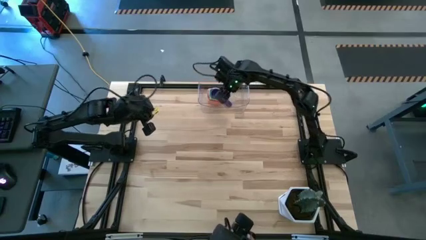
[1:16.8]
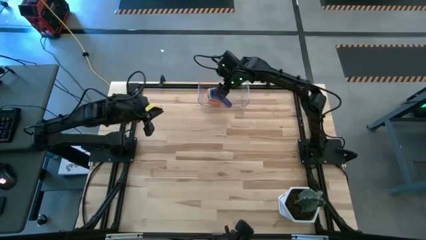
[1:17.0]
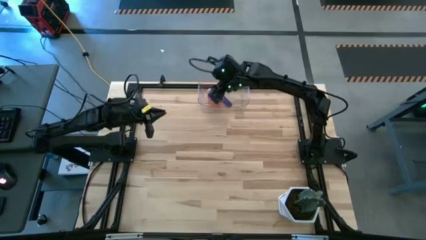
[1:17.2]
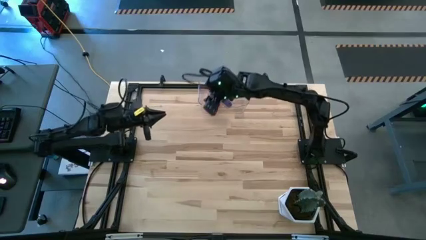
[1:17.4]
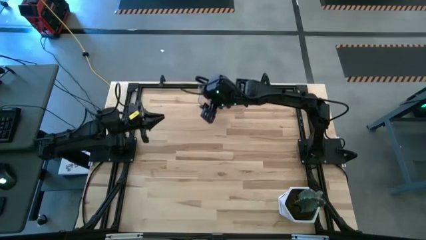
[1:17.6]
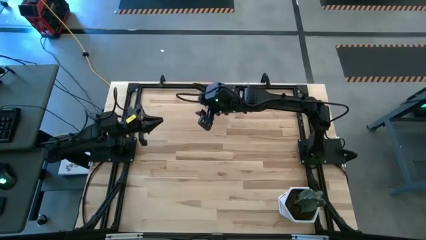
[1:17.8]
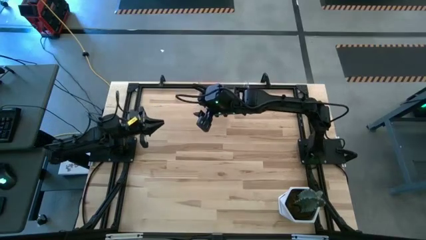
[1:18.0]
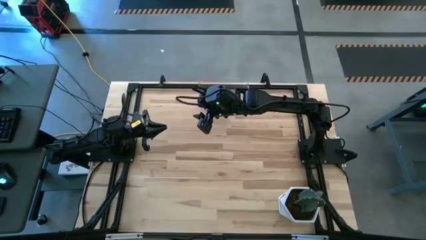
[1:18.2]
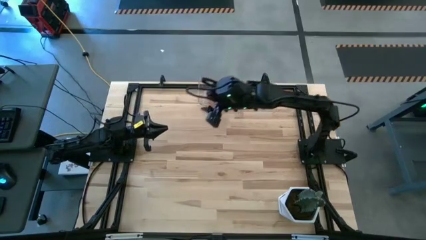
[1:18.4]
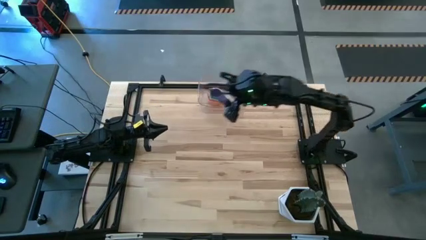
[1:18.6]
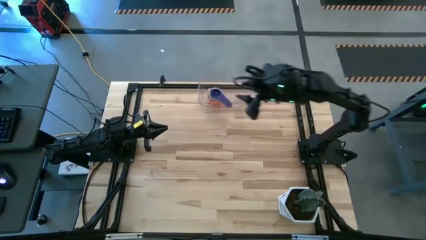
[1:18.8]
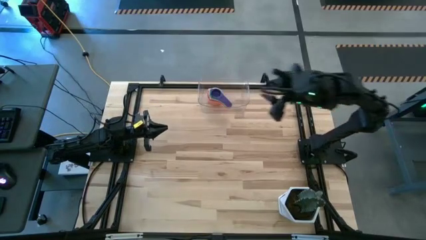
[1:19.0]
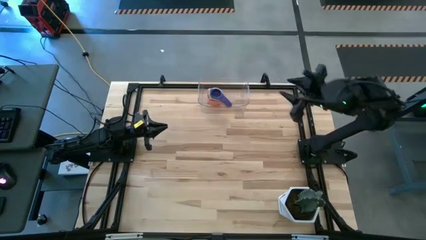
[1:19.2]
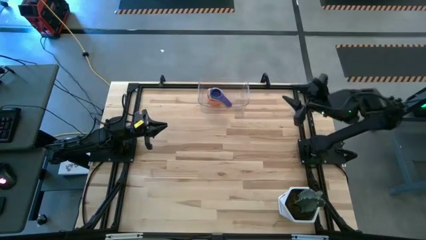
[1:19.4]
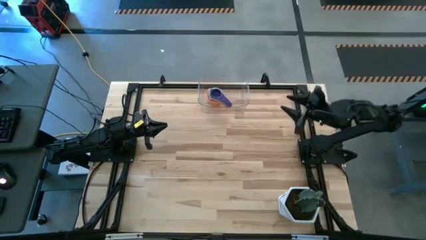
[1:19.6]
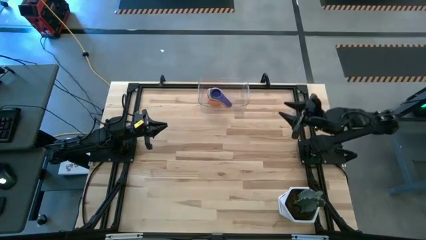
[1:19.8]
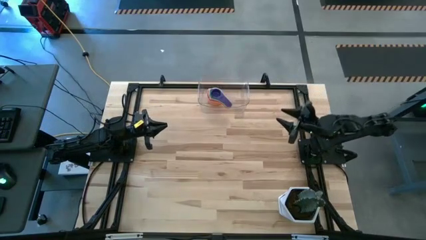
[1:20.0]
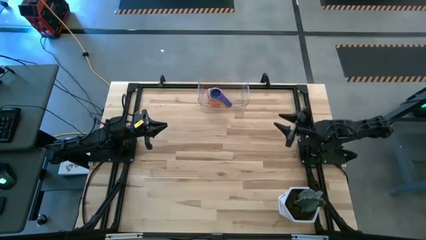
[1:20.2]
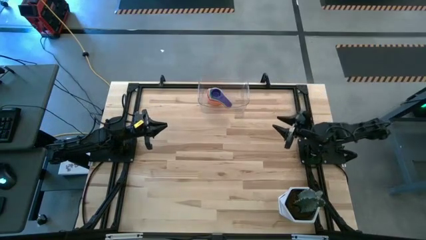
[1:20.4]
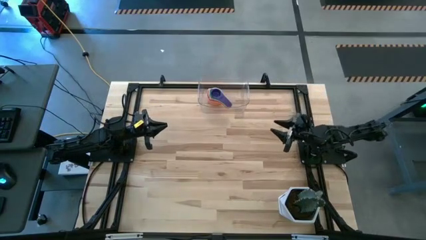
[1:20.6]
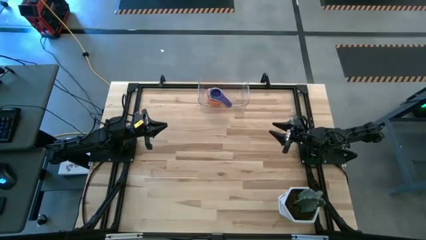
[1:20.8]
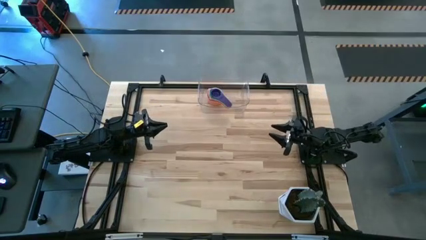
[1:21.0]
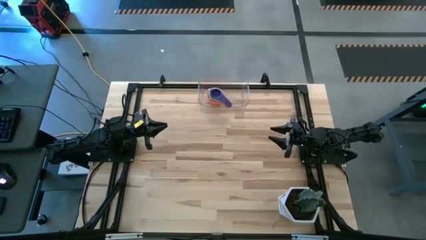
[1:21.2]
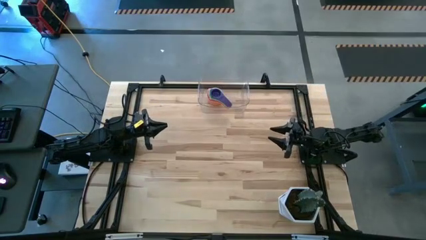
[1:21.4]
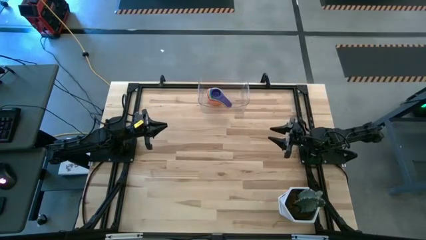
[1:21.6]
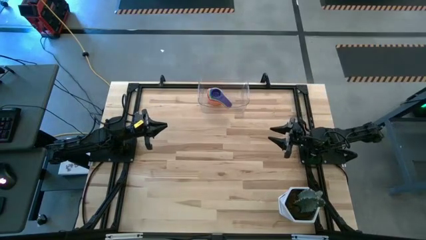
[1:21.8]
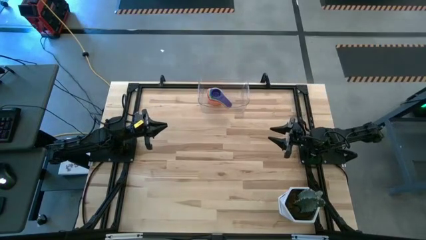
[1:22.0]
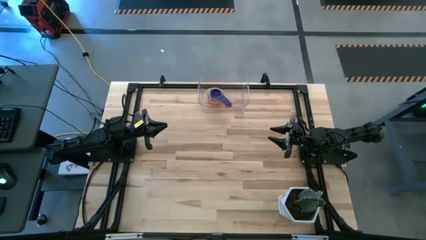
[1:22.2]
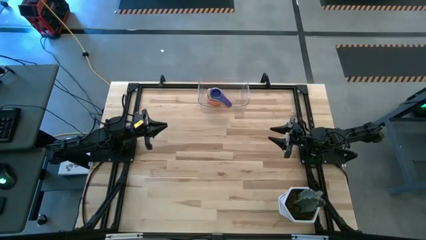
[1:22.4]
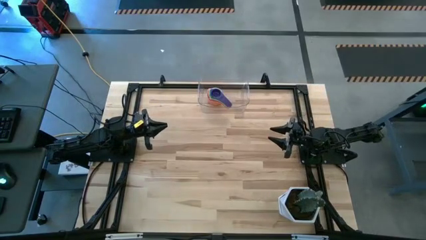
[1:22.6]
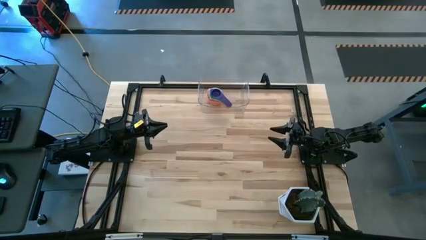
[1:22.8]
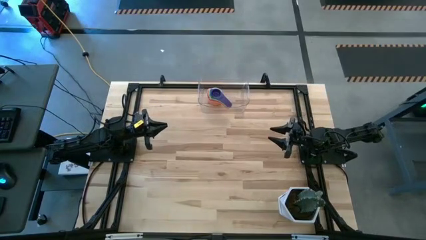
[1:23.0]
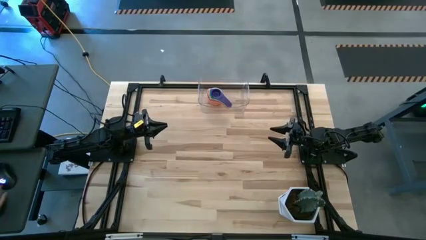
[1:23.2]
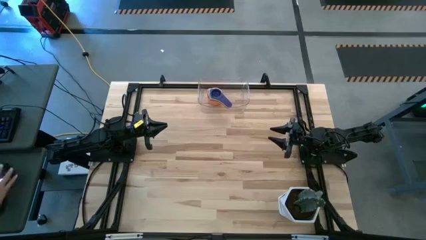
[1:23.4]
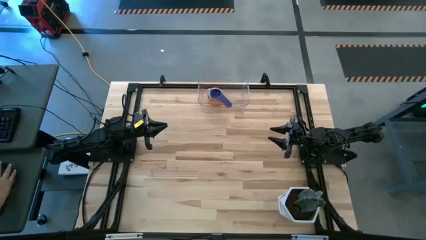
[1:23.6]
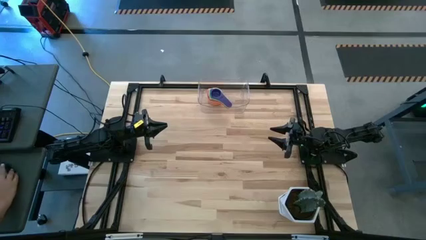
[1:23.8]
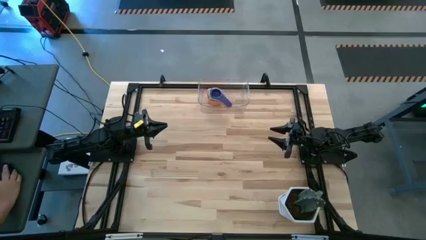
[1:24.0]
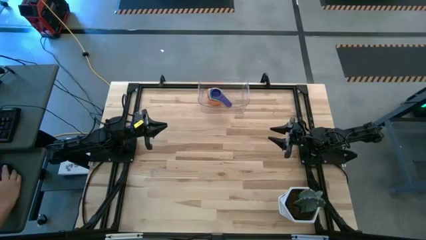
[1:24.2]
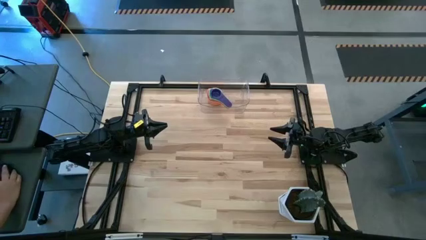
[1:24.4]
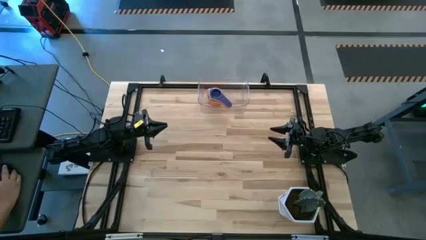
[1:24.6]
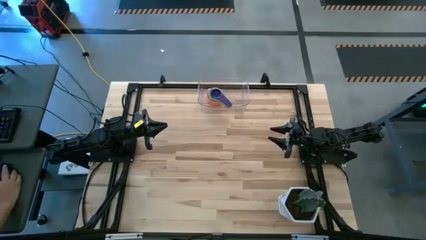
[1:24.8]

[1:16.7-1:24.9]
Task: Nest measuring cups in basket
Return to Home Position

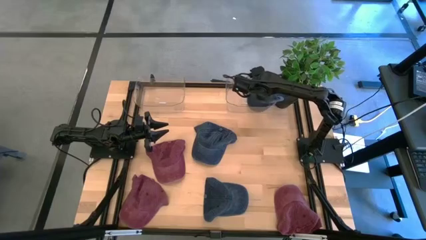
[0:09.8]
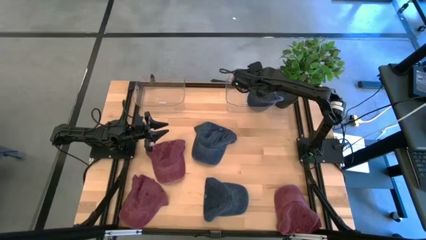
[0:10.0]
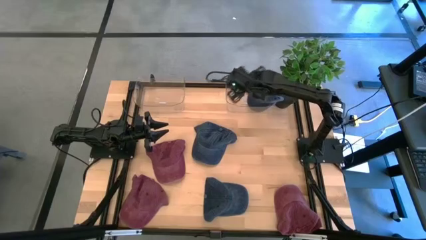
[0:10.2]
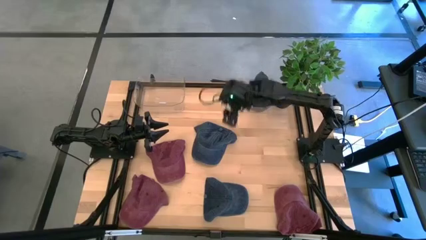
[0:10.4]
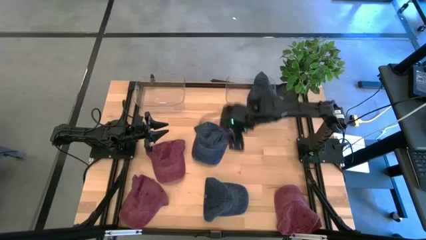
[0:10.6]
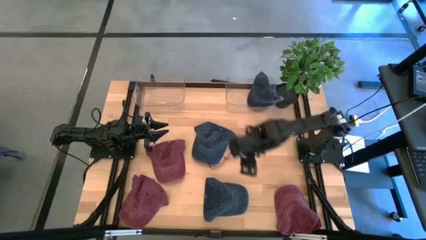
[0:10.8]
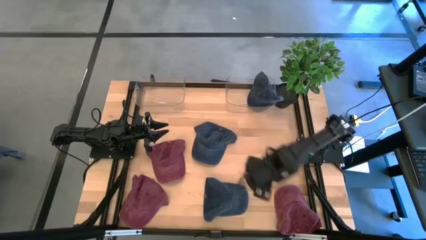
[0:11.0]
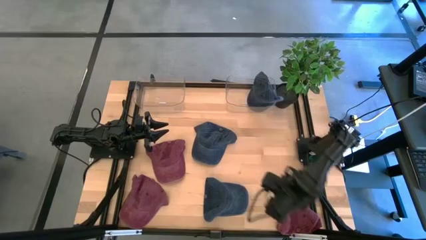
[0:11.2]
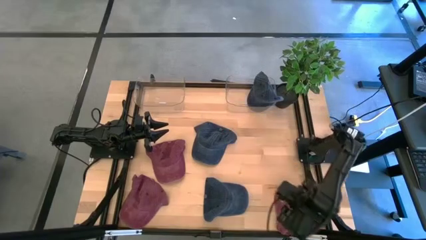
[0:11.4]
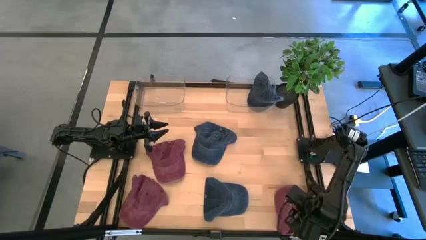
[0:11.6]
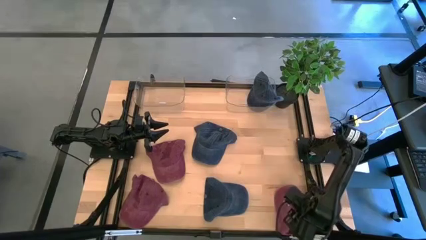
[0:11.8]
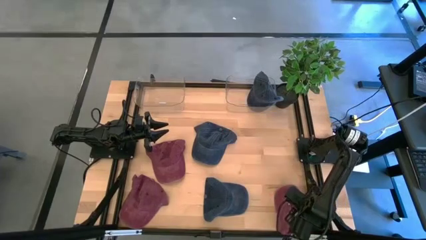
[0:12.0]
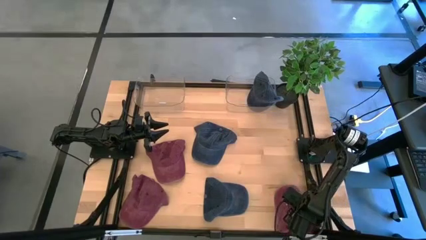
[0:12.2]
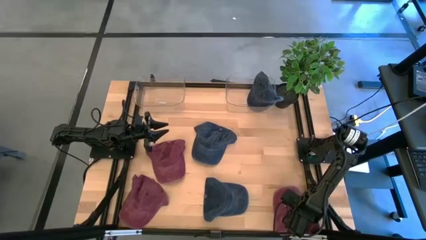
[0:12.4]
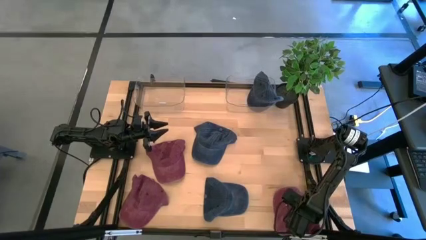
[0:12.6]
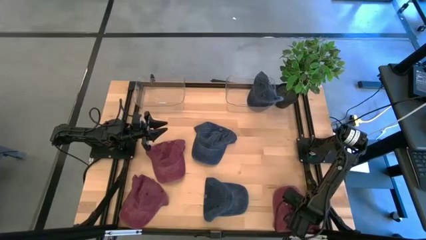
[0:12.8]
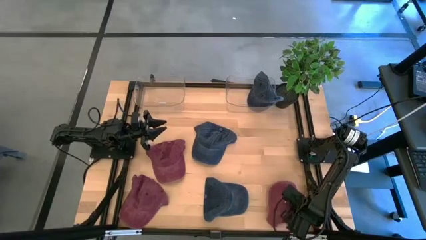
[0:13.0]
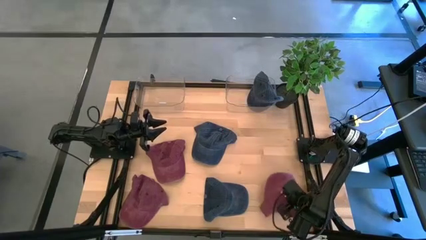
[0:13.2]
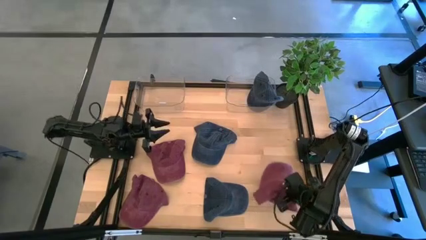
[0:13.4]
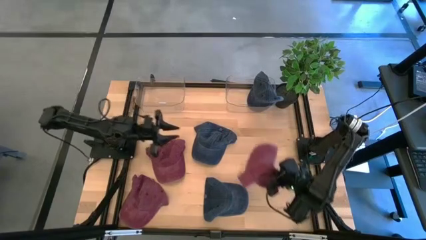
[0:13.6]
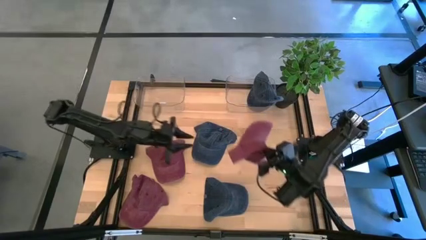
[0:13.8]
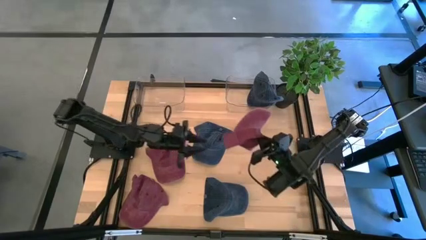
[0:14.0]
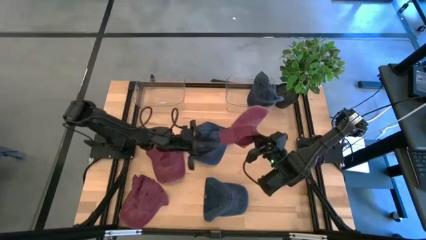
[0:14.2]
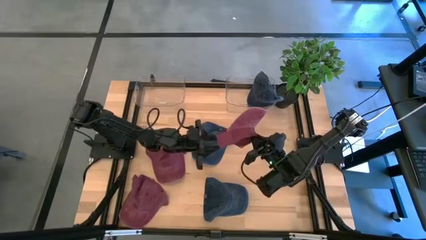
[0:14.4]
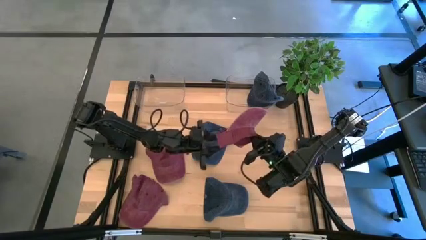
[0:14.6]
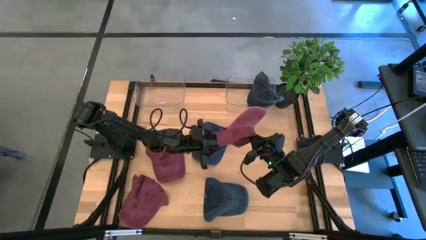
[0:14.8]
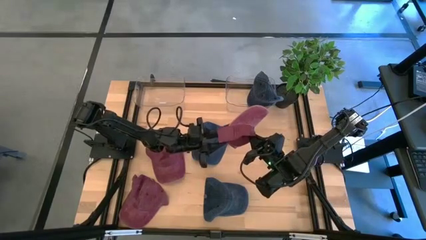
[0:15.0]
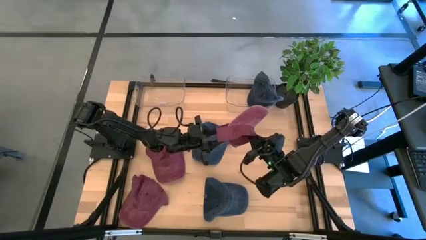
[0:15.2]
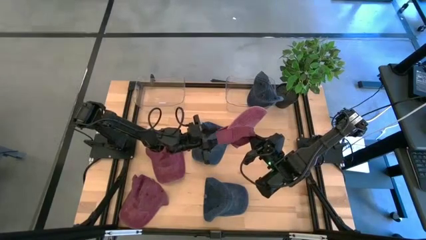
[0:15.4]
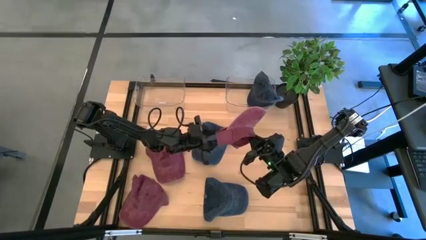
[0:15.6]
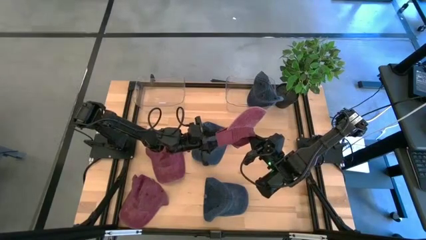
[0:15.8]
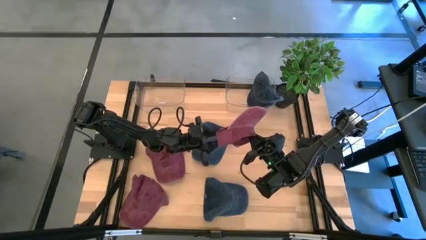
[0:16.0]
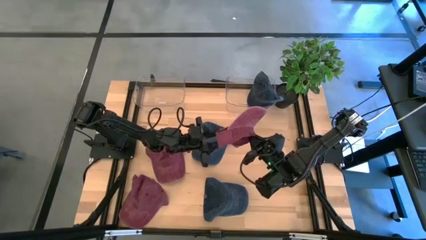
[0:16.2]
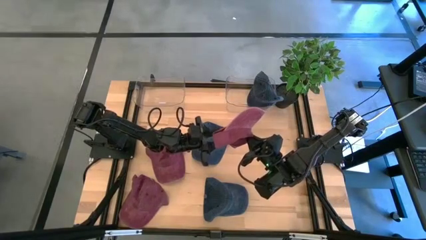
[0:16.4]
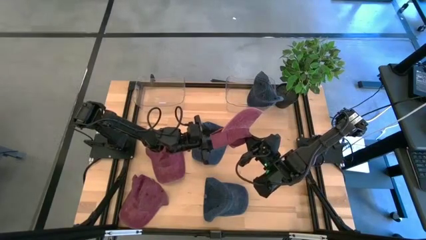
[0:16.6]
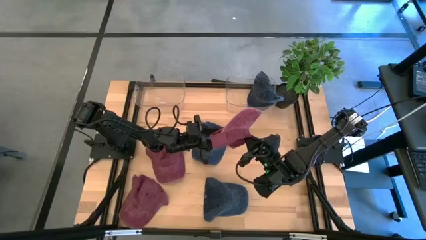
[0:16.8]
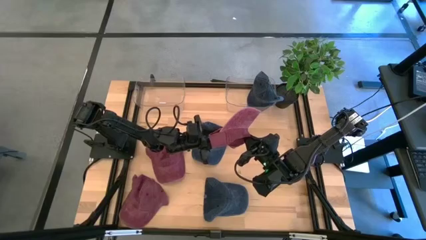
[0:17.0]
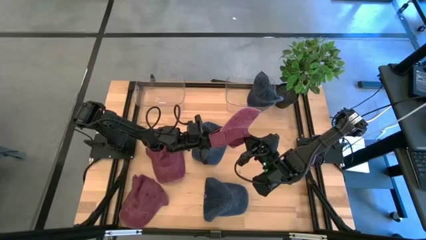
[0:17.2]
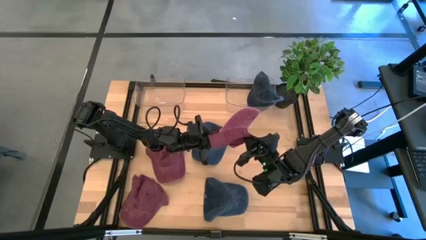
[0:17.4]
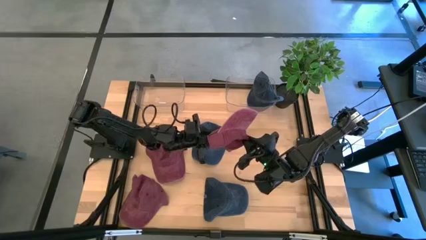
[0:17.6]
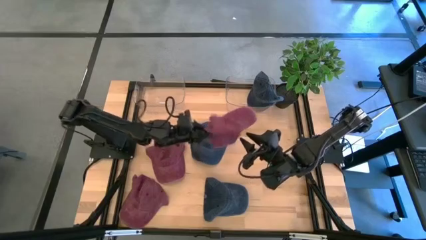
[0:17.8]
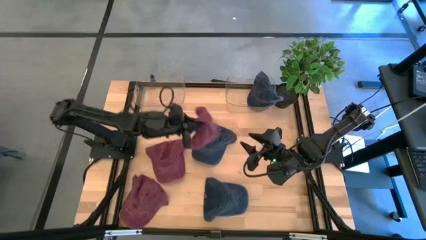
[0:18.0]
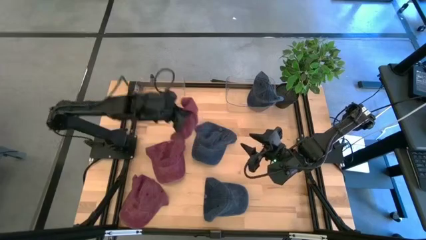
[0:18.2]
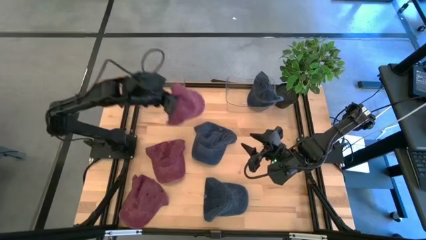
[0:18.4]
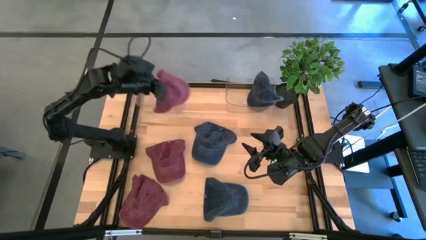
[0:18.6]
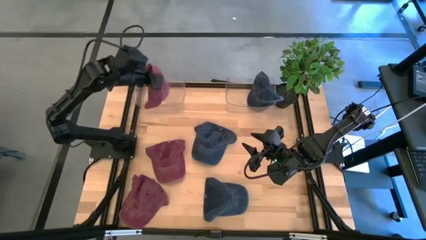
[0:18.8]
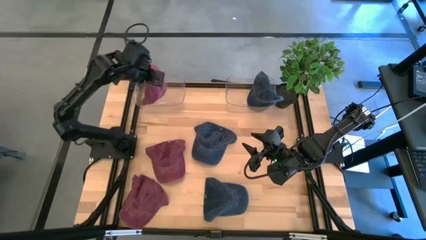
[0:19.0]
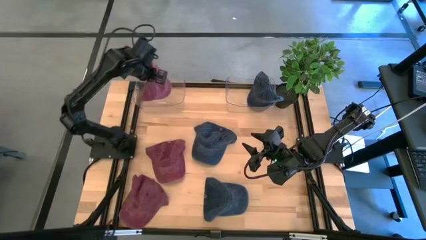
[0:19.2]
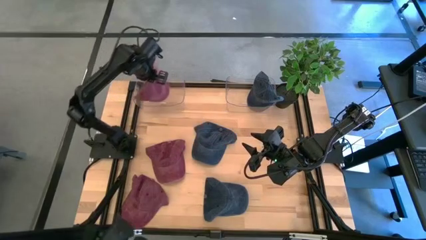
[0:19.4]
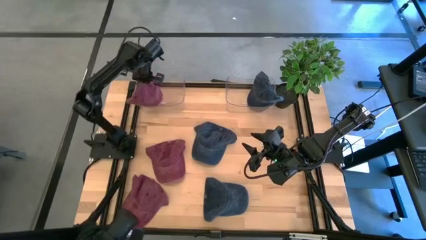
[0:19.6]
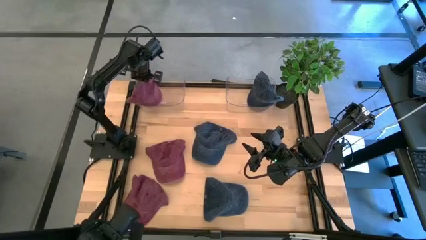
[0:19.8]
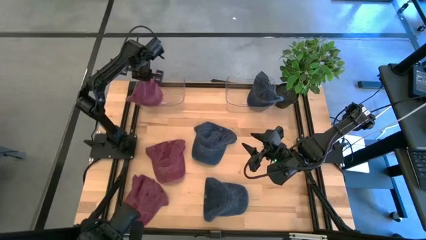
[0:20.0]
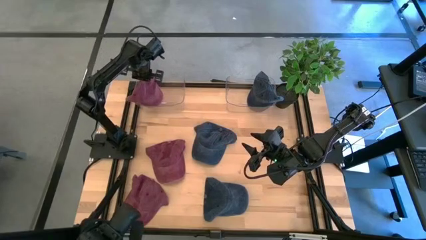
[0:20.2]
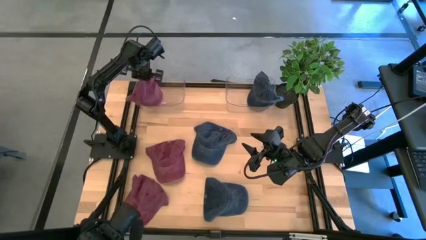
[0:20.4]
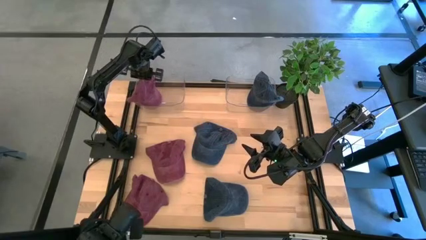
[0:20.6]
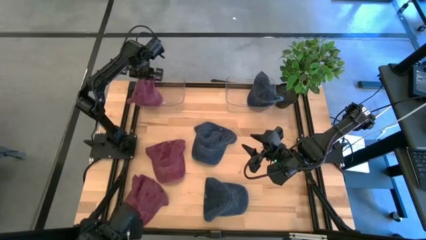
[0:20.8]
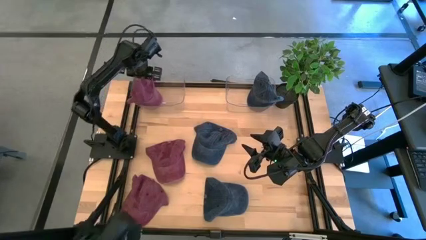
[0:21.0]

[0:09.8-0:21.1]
Task: Pick & Place hat
Put the bottom right maroon cap into the left transparent bin
